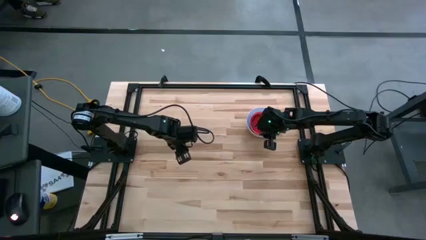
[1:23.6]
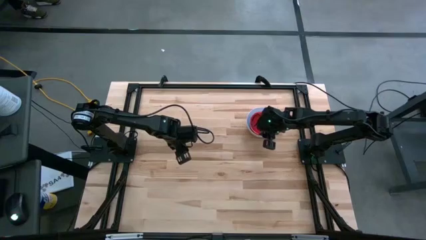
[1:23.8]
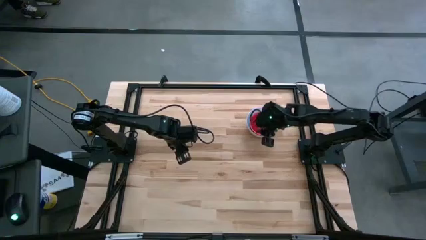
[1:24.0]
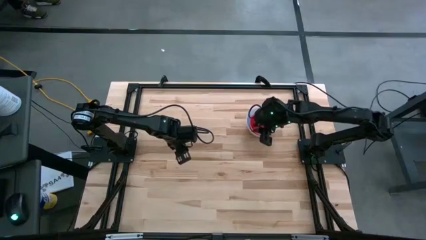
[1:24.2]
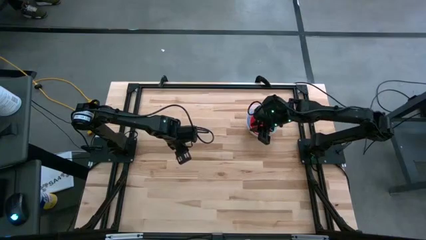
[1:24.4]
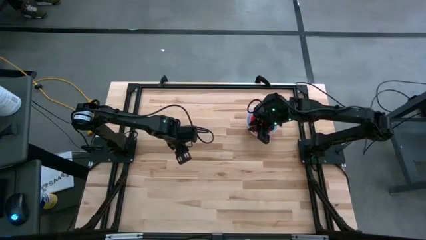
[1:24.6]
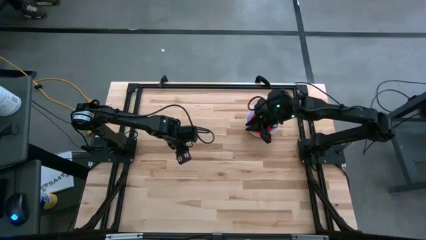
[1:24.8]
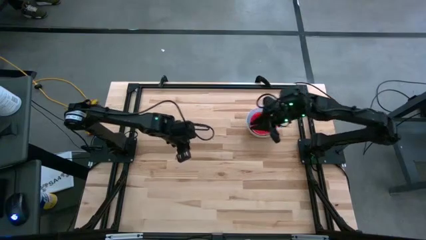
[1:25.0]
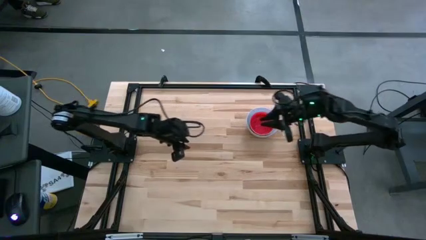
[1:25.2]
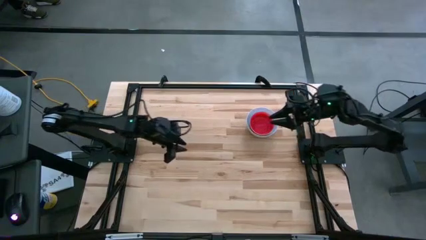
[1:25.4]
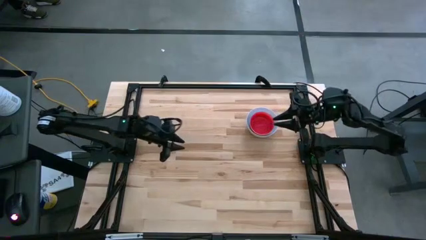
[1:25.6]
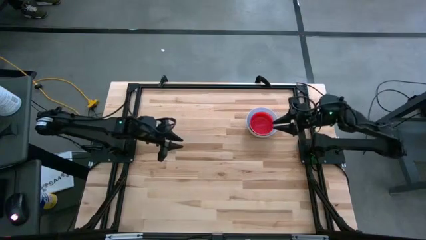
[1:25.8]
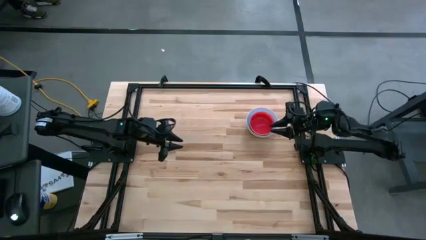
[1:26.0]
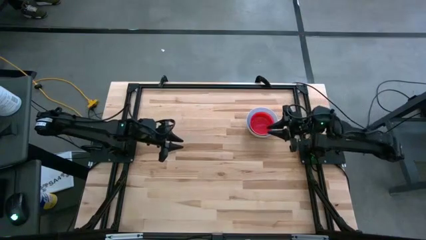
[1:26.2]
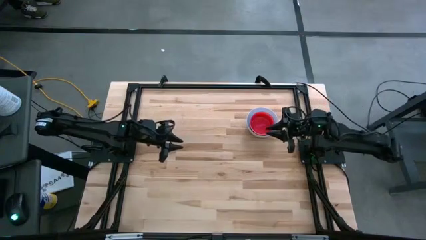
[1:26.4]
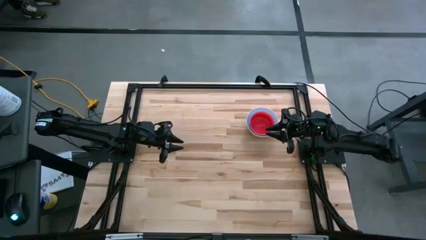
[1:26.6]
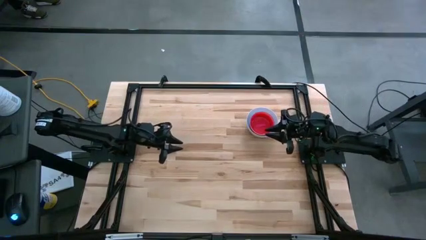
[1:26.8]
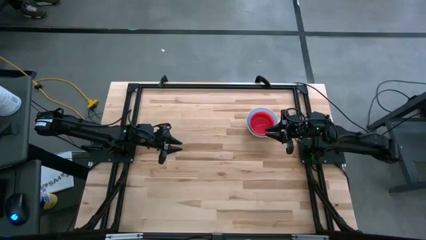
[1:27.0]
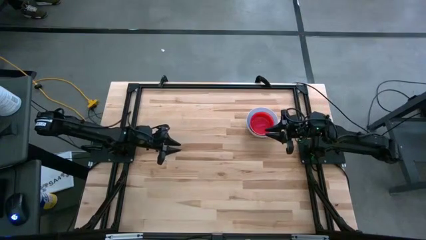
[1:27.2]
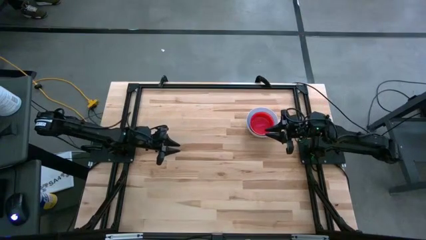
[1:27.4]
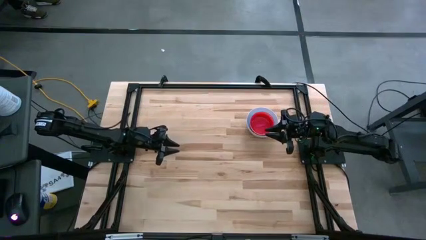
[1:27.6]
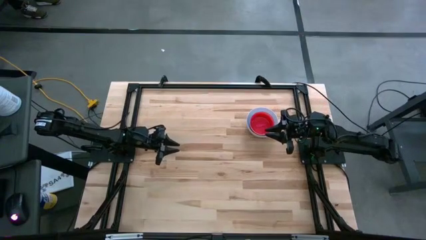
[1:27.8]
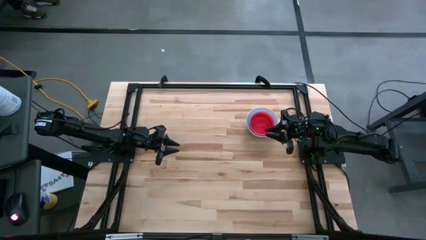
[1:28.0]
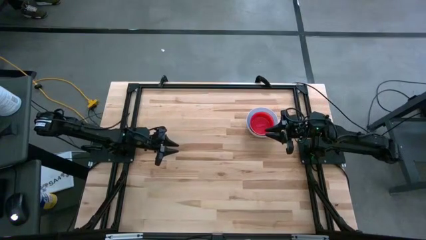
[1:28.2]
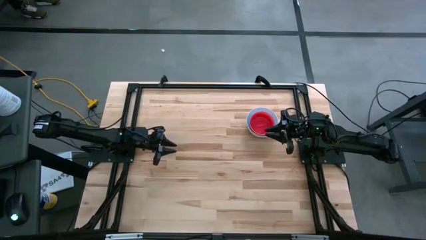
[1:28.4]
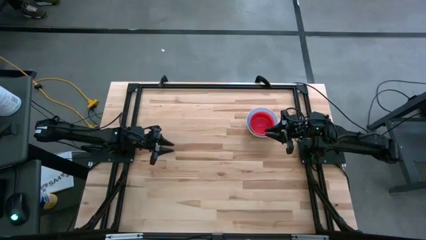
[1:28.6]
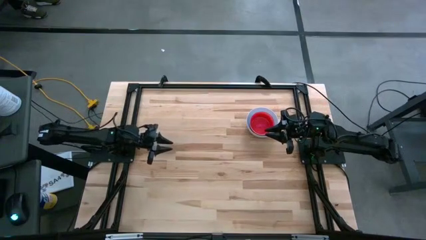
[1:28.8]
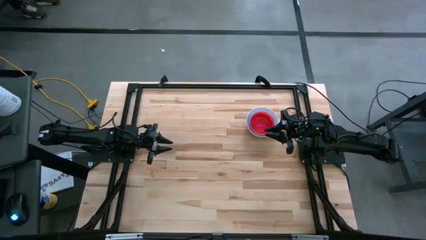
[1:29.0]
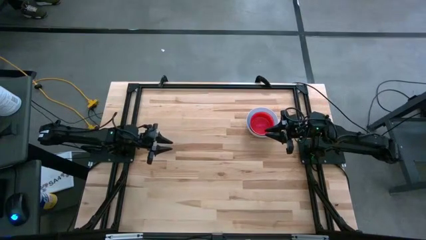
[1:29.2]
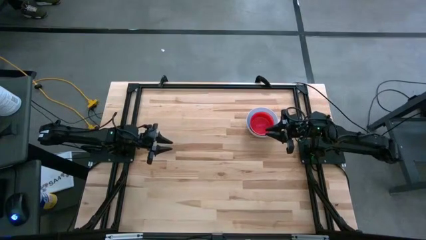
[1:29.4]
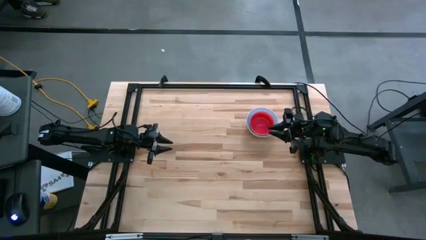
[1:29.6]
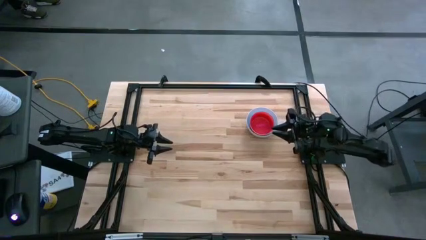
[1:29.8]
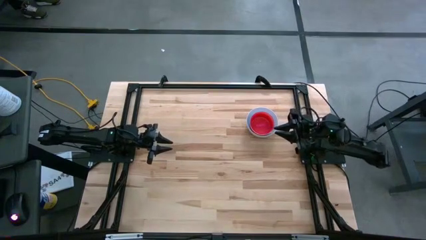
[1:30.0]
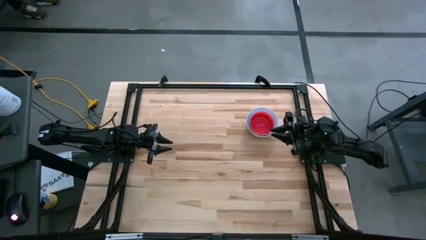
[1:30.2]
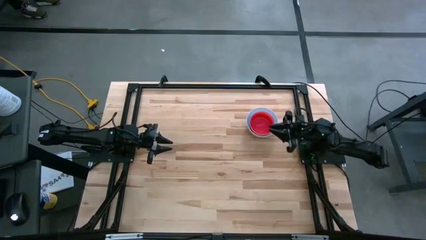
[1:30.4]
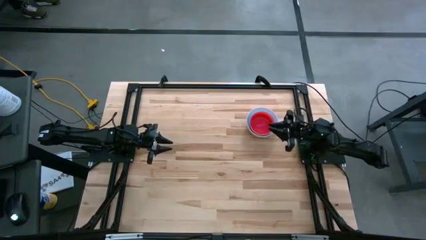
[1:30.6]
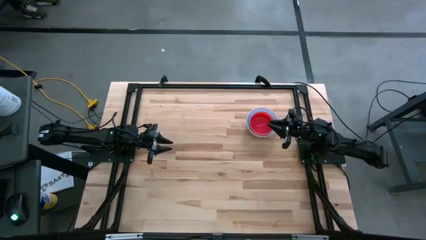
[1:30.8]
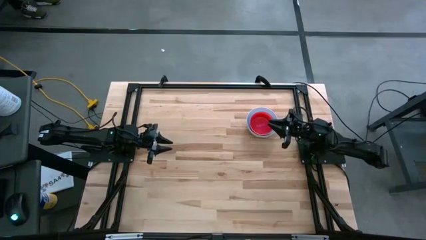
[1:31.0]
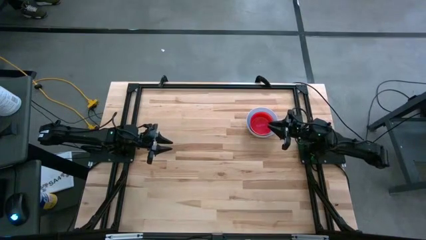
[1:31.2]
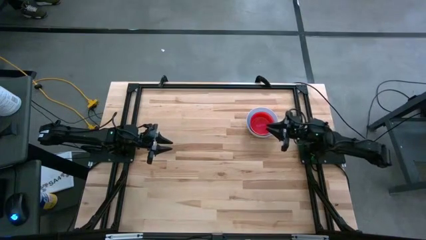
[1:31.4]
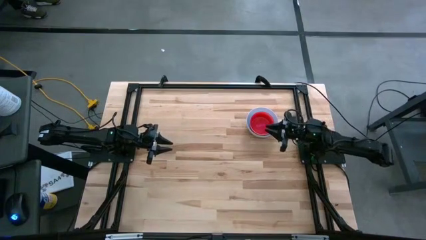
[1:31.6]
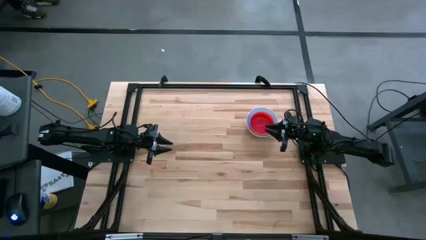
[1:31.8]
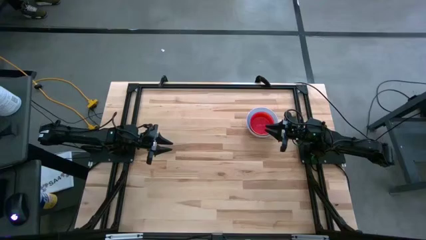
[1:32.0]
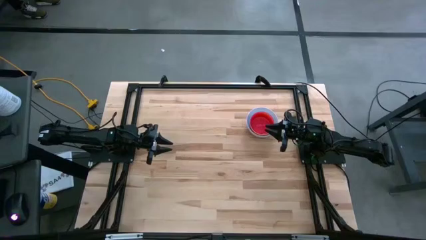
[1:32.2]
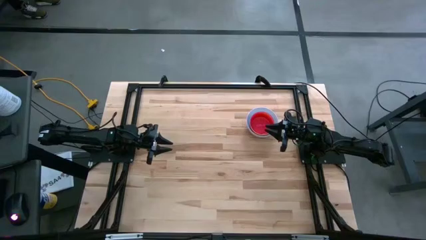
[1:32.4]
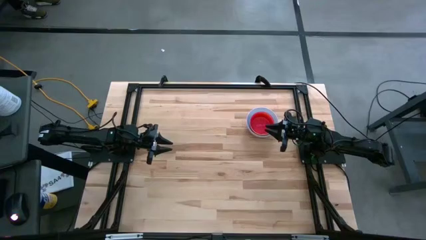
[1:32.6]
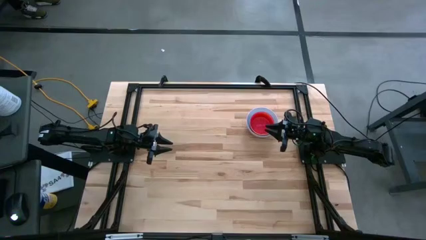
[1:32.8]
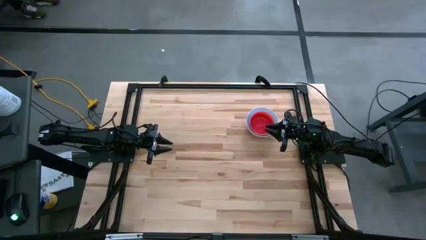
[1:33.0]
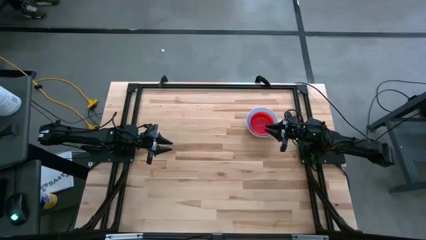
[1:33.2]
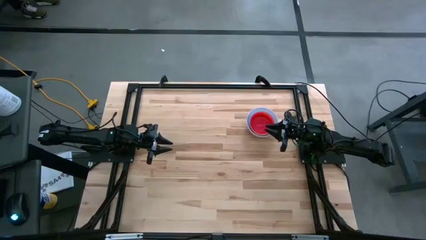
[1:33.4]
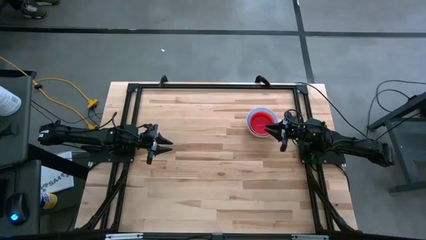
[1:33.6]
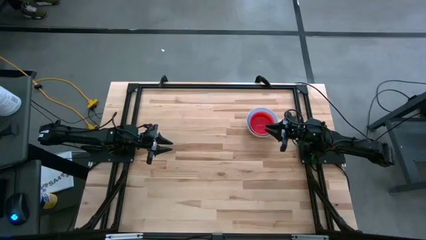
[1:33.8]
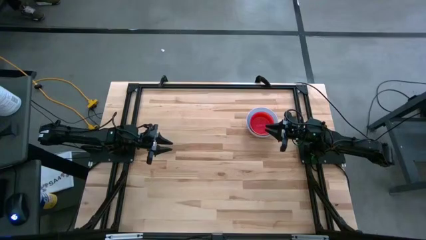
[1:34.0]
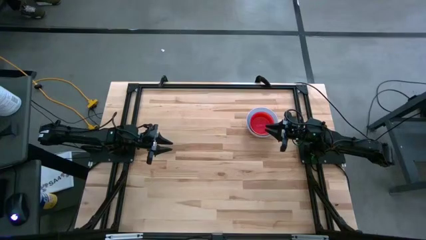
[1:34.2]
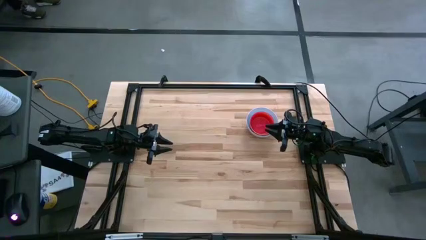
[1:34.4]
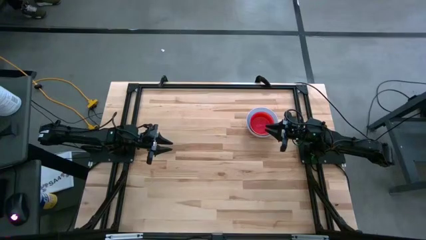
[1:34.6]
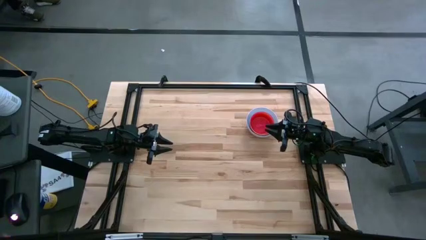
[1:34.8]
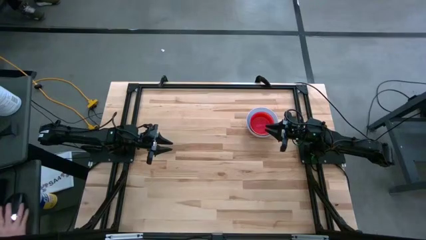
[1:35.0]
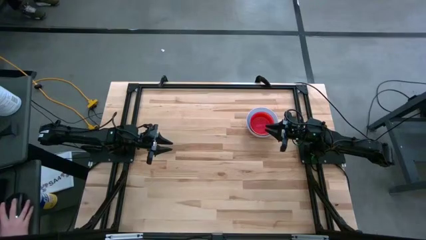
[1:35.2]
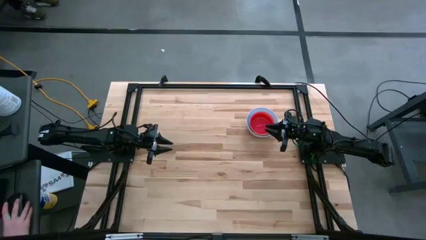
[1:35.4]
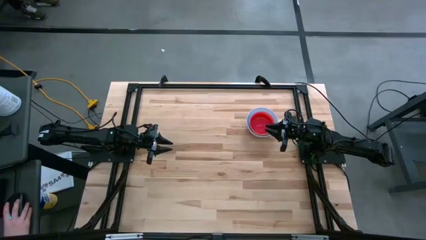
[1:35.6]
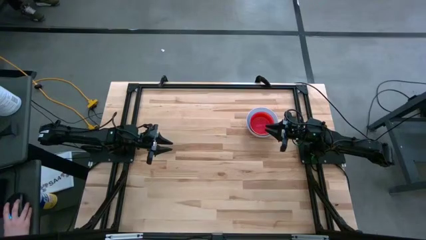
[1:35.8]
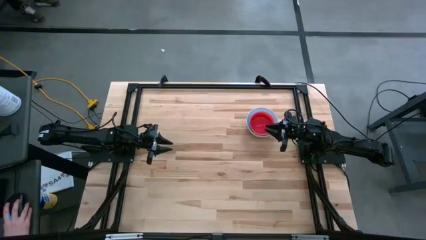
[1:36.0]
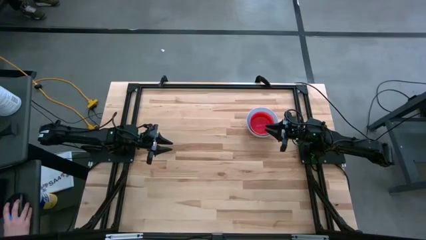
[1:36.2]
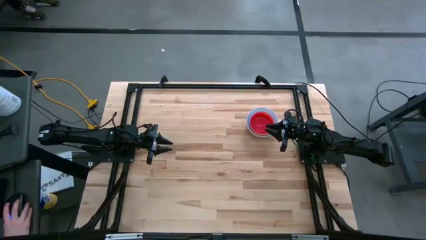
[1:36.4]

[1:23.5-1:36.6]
Return to Home Position

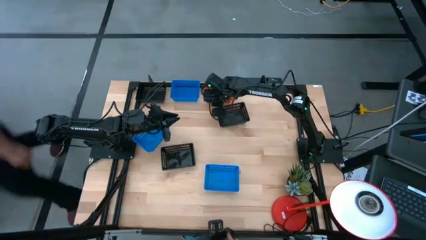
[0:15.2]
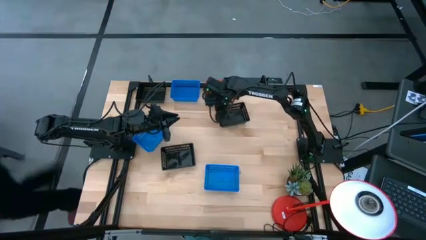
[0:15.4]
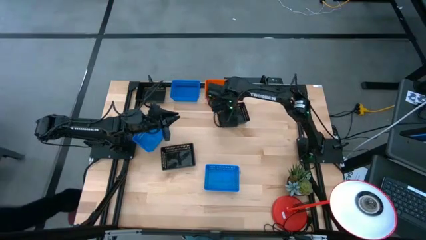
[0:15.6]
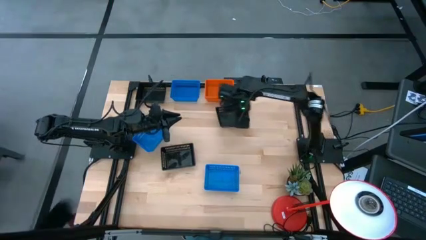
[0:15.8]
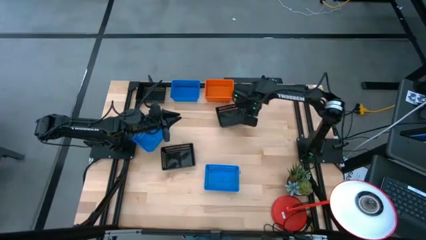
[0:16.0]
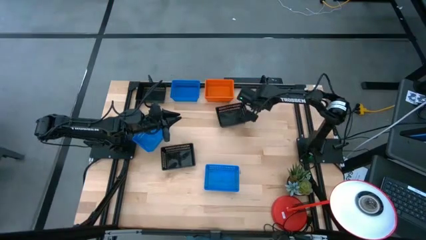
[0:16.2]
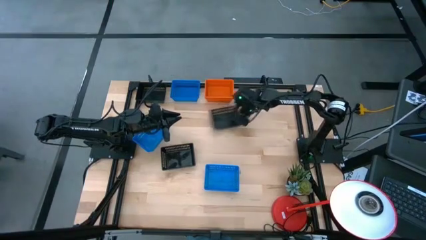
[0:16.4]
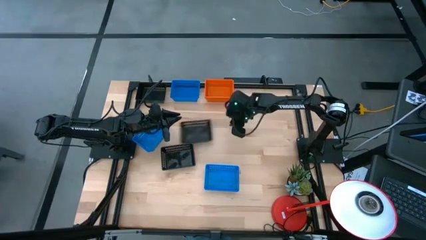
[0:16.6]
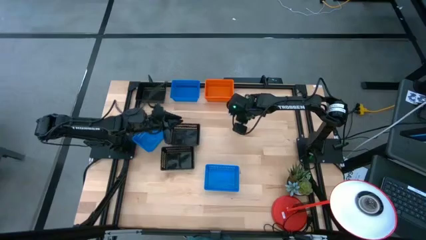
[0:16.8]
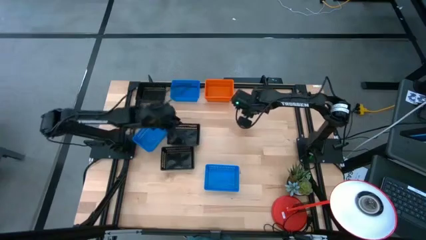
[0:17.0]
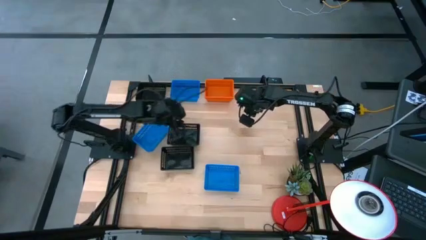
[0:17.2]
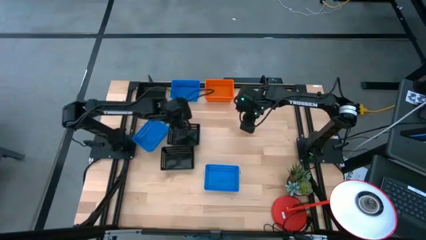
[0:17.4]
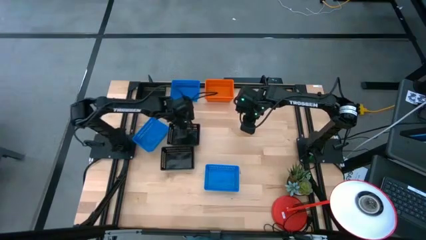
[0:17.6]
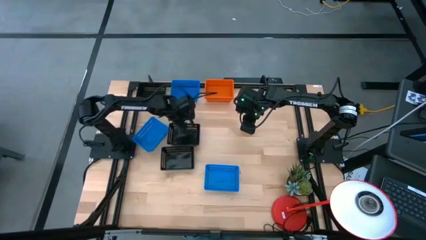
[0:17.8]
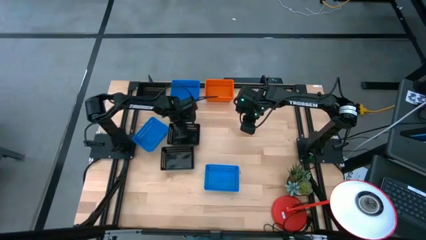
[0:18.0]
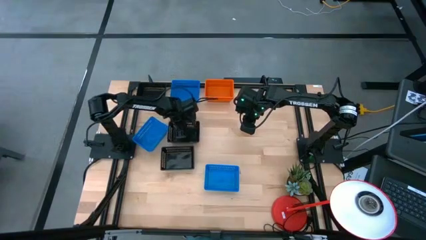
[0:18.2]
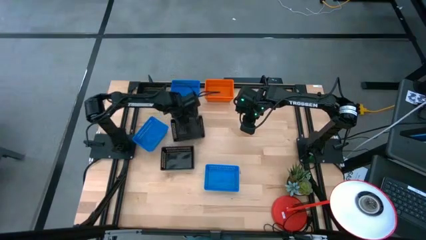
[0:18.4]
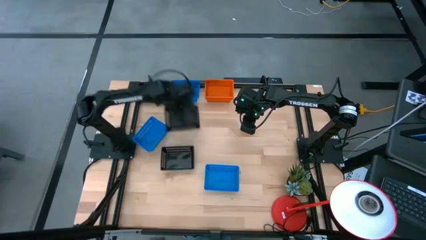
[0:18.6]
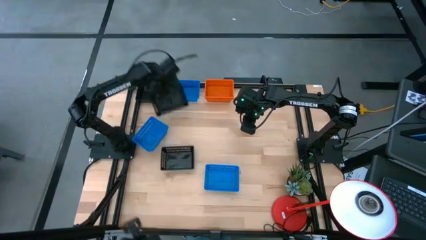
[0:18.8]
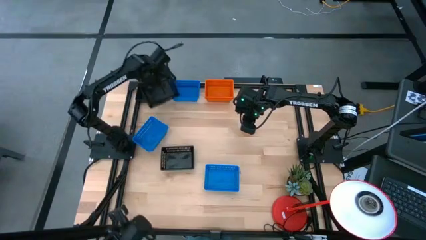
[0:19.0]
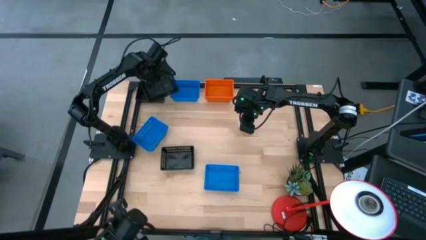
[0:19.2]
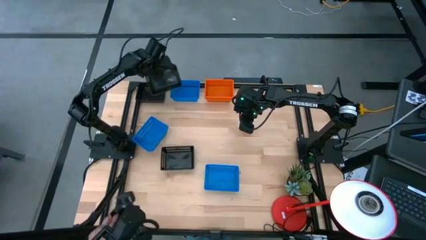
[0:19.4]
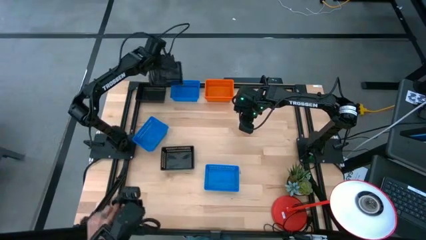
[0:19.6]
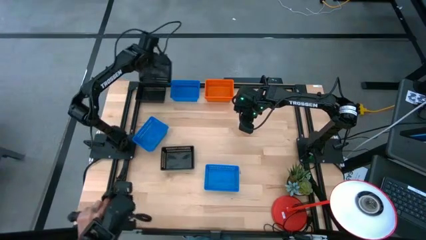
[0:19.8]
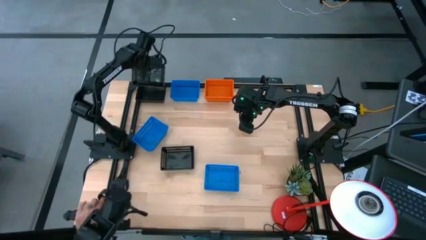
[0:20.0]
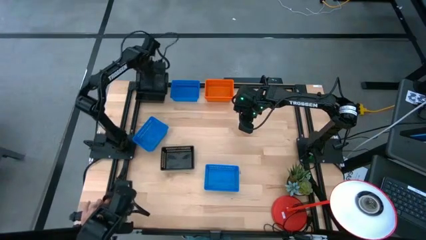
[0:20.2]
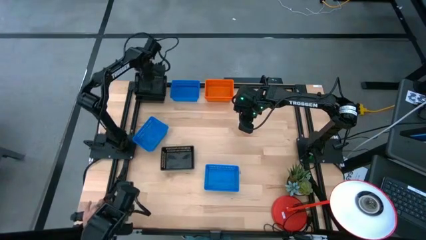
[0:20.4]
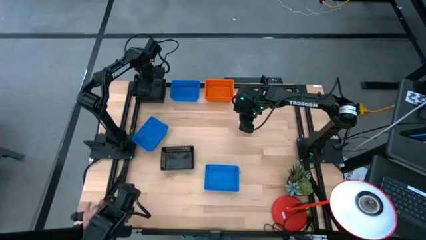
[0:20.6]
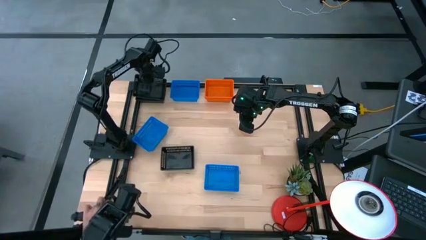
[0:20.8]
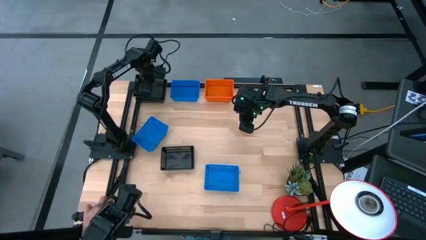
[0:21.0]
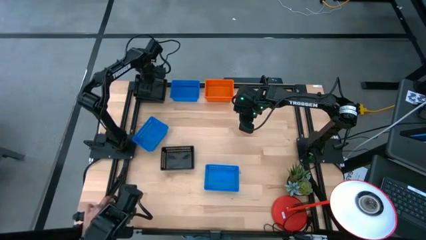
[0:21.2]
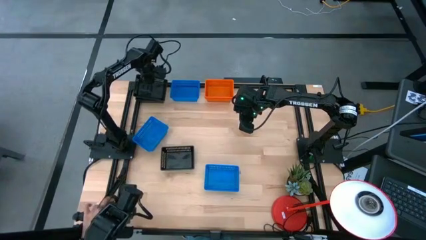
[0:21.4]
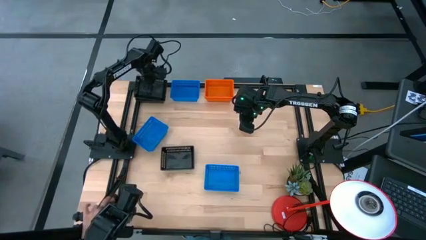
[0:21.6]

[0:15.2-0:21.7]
Stack the middle black bin on the top black bin
